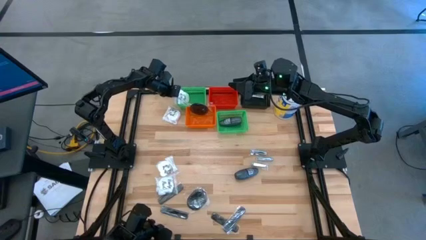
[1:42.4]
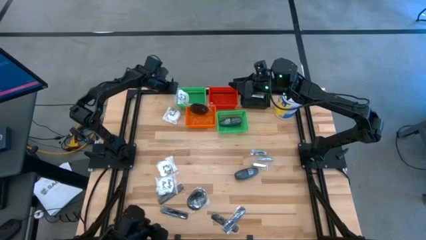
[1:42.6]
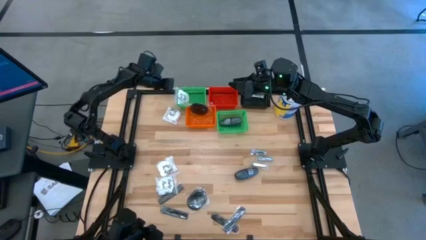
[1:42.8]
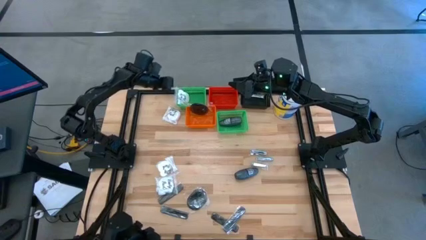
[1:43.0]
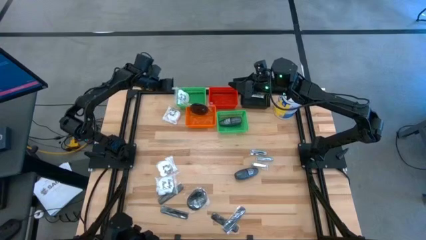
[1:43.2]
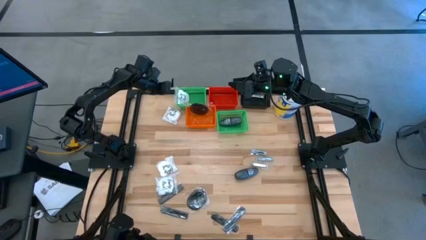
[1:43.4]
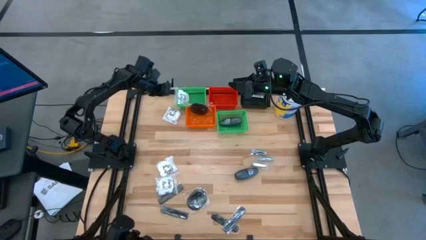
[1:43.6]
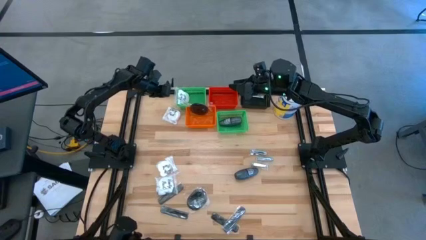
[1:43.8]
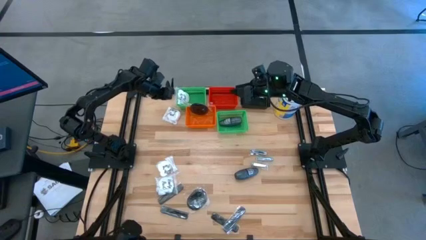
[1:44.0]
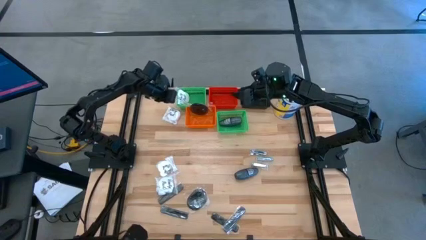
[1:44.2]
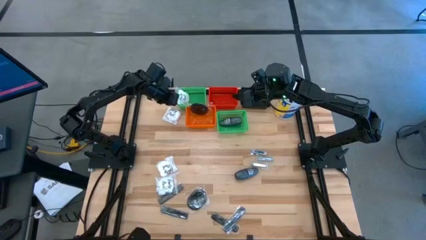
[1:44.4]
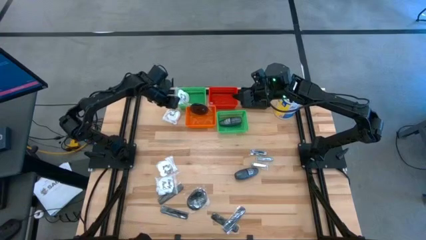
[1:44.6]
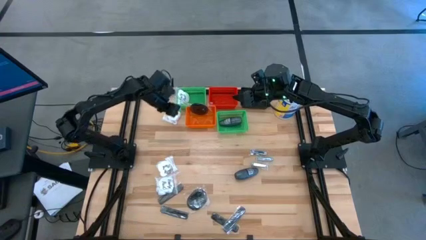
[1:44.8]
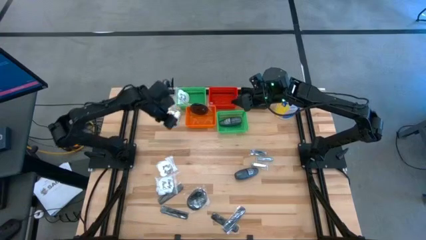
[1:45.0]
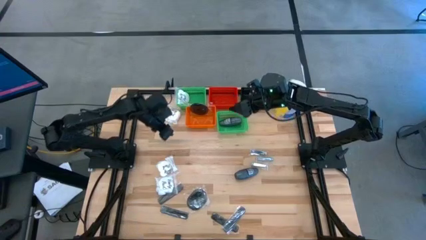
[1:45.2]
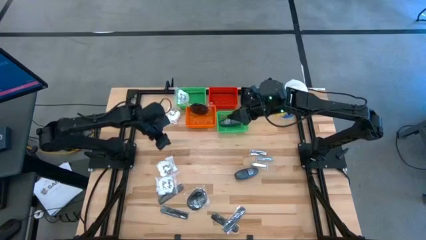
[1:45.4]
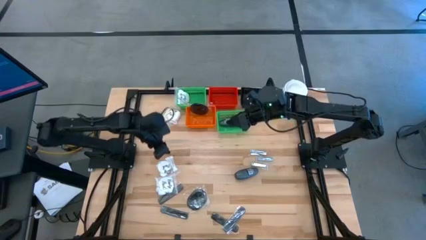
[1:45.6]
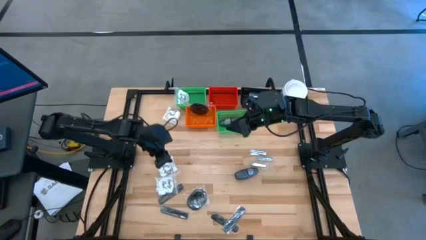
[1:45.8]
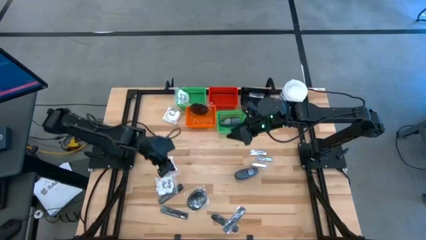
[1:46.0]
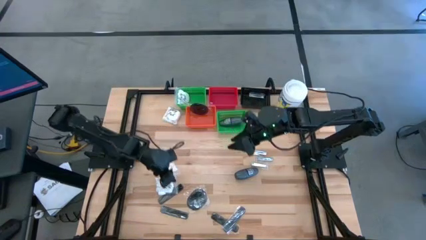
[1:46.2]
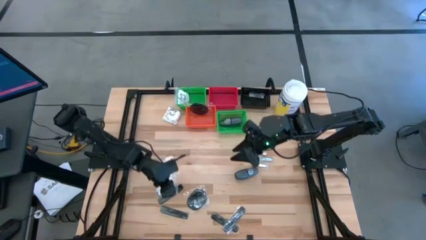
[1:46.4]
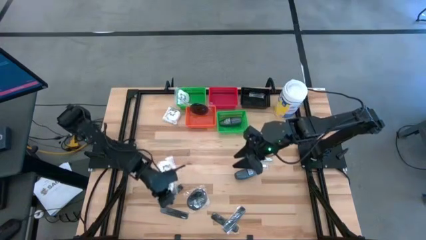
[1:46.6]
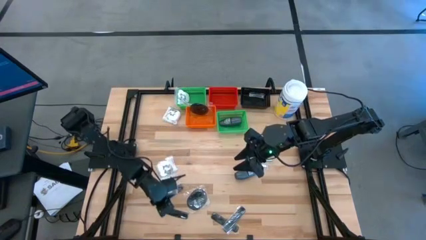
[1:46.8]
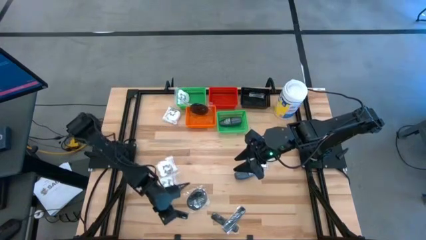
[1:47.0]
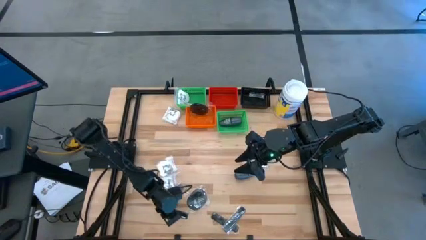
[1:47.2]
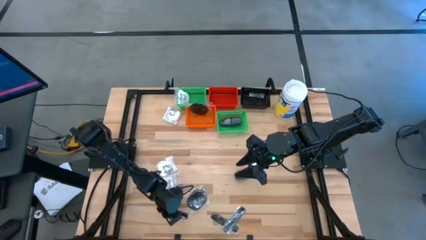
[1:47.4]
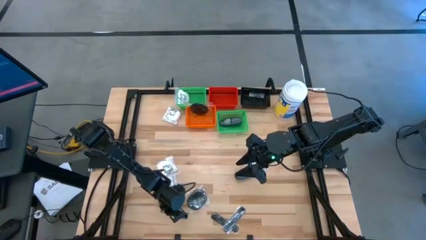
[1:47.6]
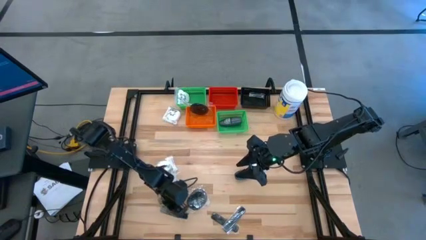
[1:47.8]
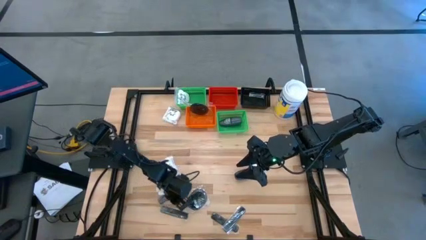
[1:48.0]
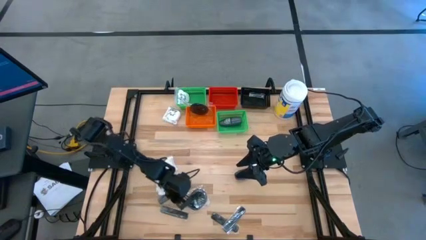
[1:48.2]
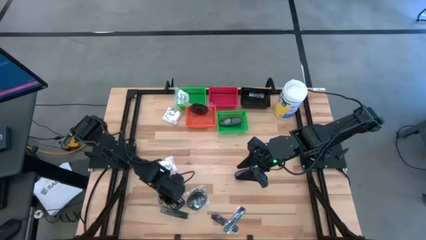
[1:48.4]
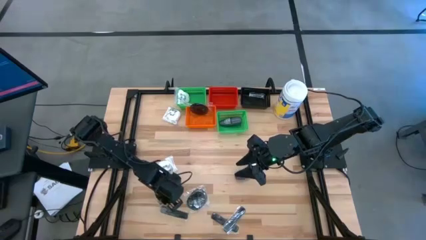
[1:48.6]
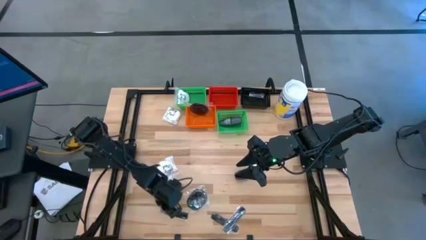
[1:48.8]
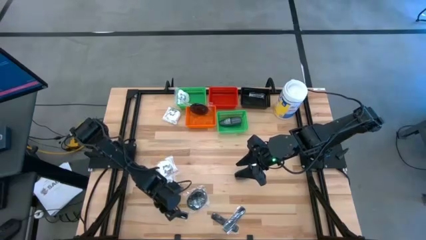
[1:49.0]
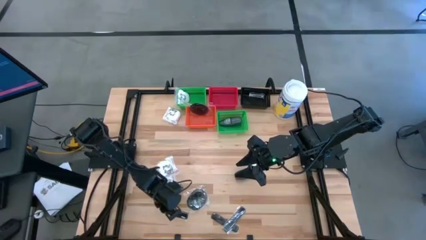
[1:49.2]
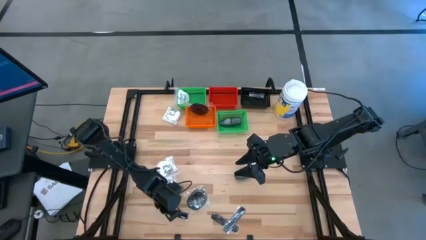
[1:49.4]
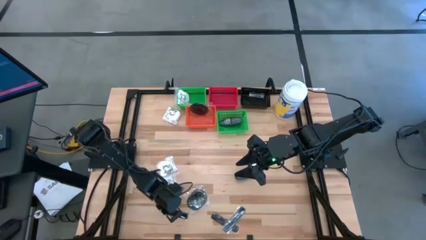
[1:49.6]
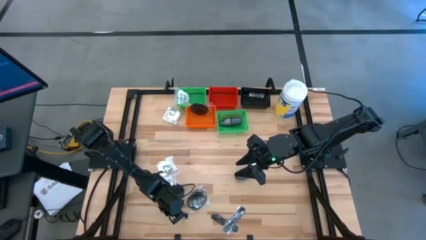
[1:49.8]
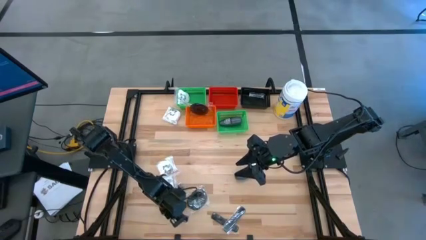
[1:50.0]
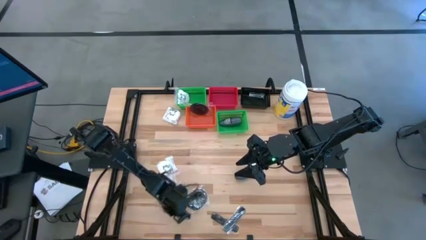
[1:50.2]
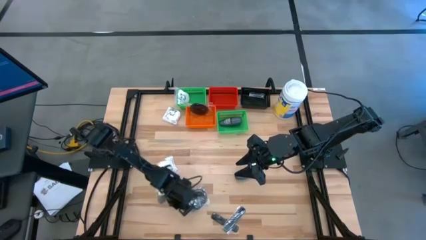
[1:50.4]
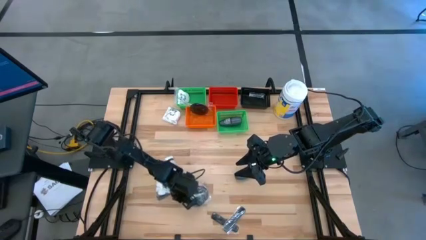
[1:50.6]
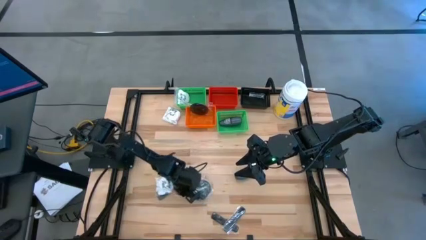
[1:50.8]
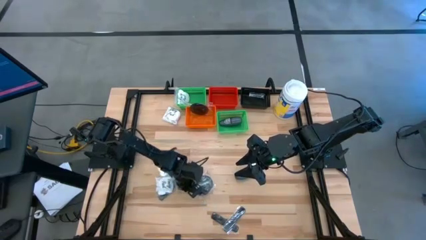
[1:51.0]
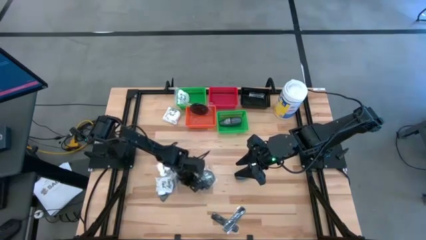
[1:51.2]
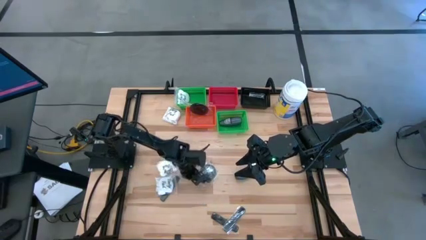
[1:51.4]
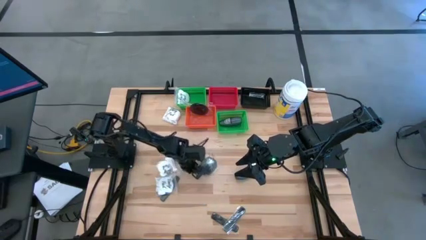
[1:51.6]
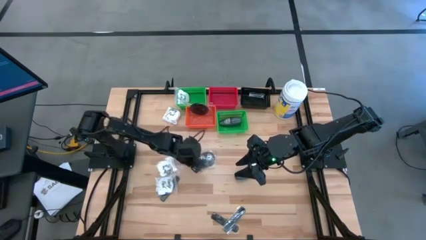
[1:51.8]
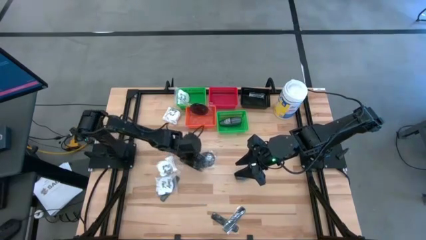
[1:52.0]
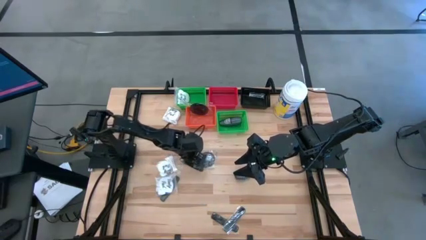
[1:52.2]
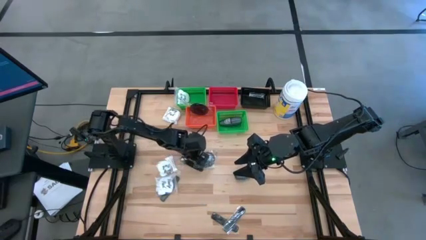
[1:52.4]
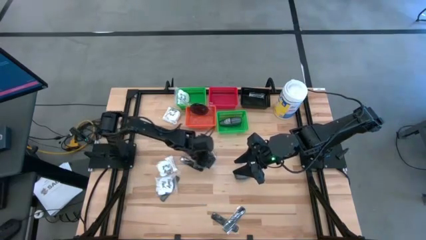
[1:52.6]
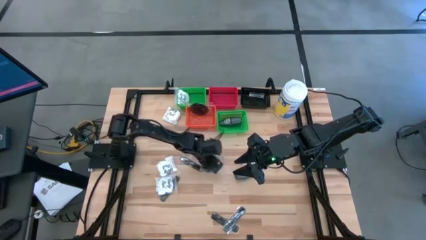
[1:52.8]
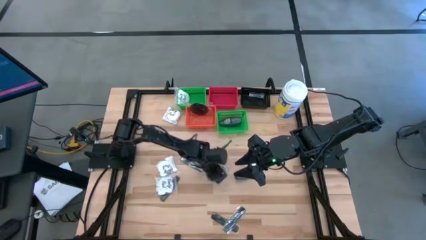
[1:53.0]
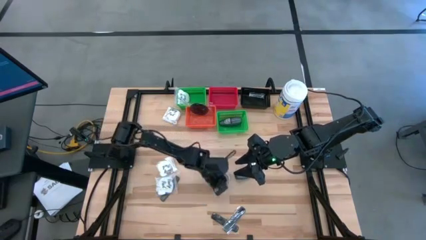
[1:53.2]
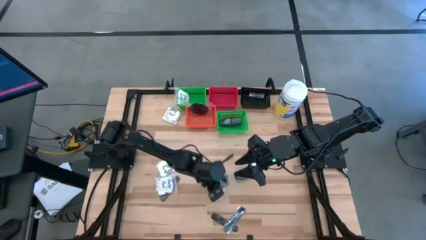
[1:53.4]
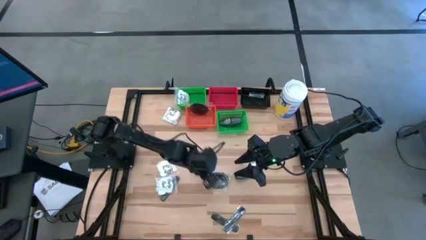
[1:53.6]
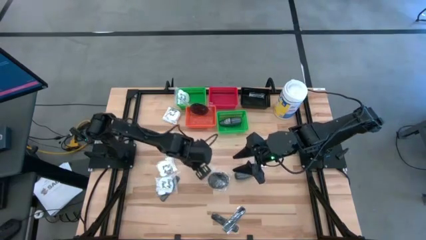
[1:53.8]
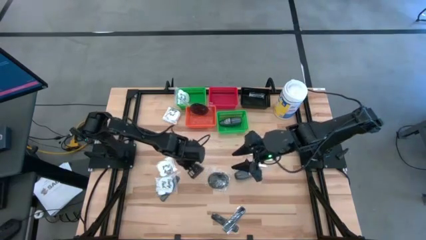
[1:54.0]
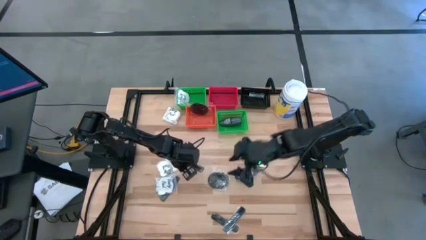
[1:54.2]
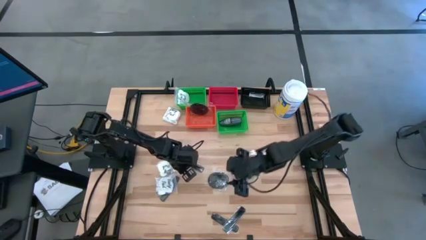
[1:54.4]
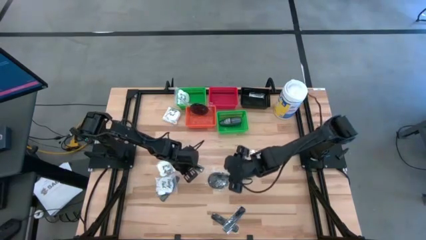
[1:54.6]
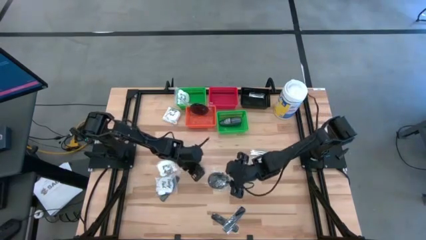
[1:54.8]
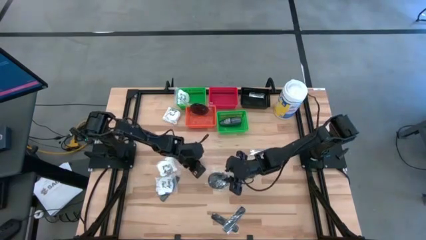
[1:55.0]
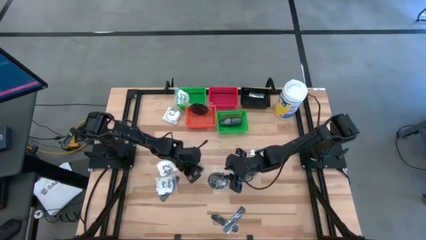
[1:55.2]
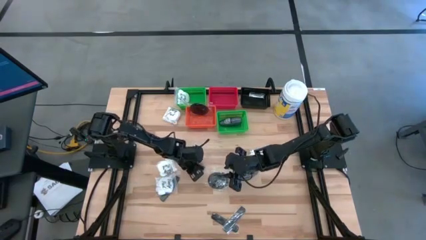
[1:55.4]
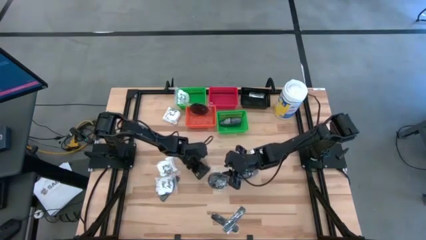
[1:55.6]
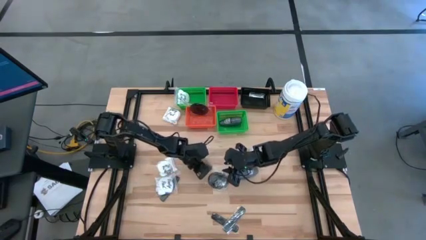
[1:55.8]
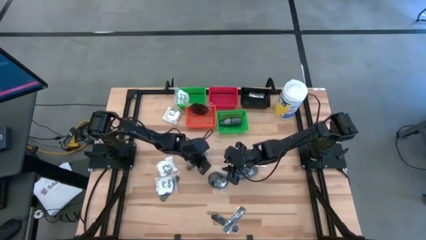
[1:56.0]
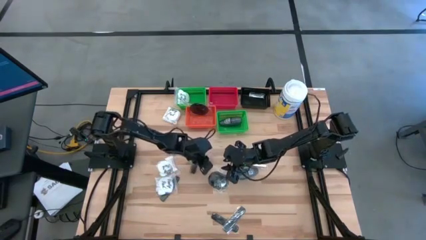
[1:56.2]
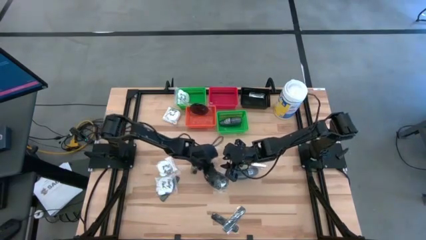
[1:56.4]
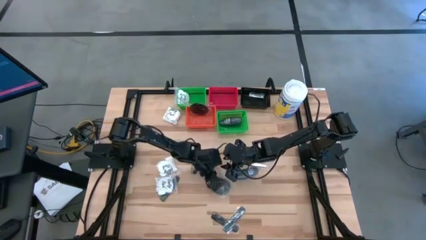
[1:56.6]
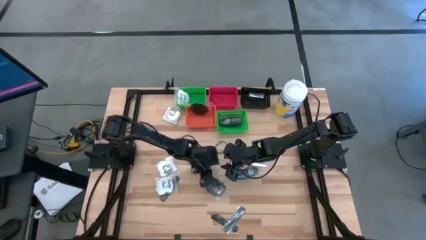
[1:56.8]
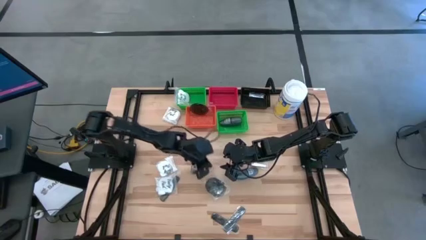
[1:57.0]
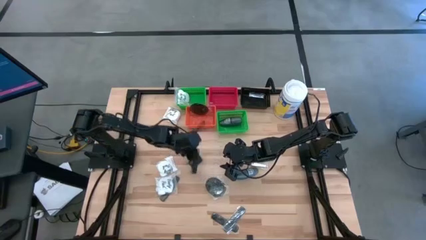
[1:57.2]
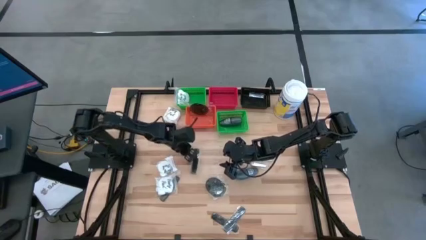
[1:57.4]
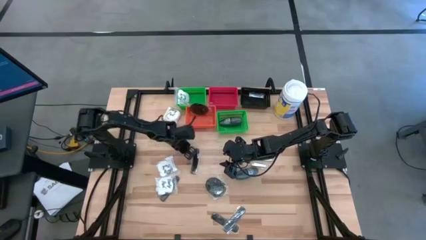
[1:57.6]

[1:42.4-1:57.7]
Task: Pick & Place Travel size toiletries
Put the black comb into the red bin

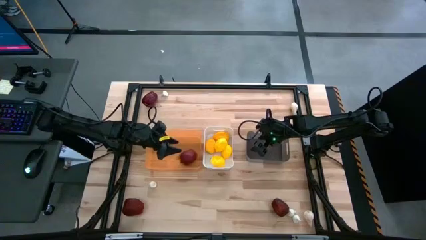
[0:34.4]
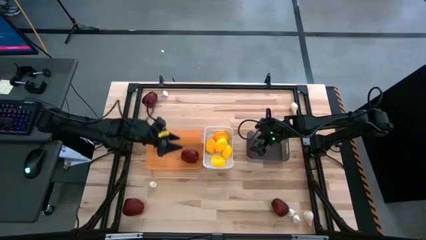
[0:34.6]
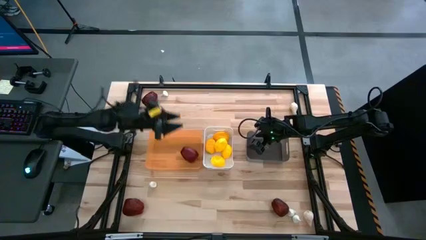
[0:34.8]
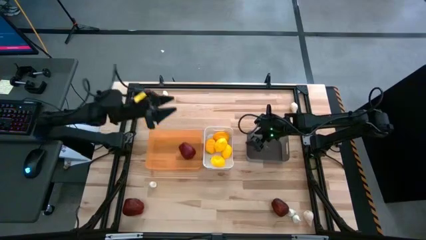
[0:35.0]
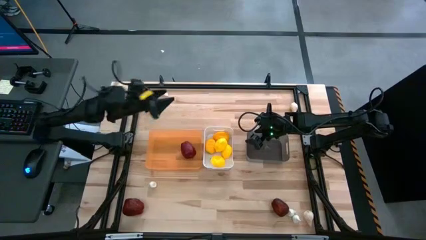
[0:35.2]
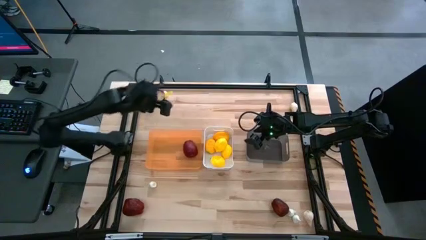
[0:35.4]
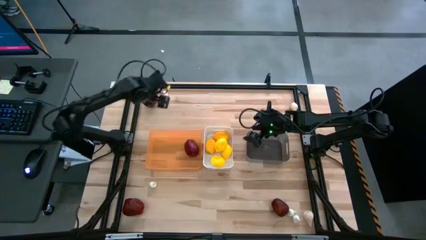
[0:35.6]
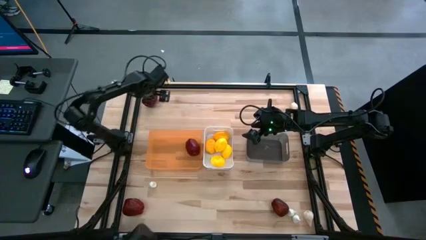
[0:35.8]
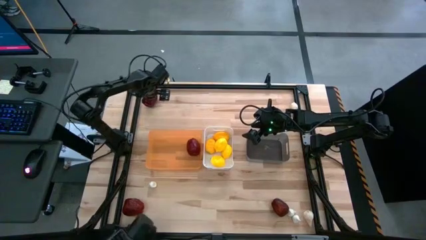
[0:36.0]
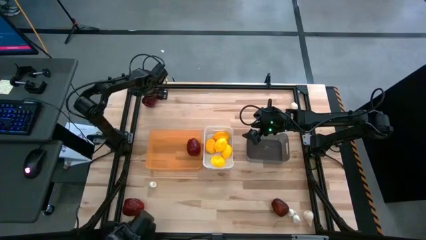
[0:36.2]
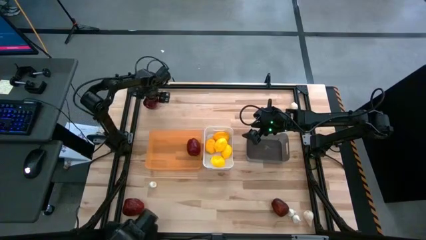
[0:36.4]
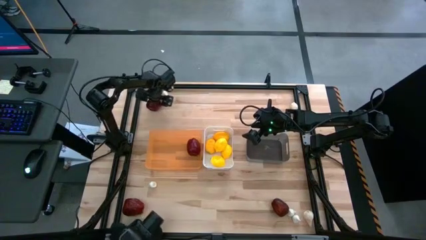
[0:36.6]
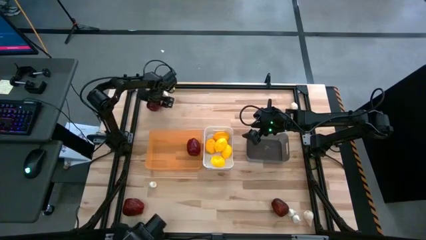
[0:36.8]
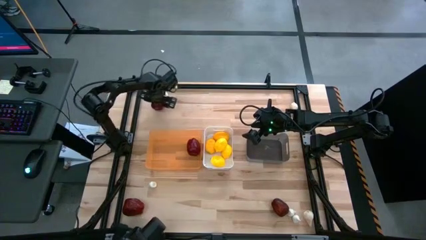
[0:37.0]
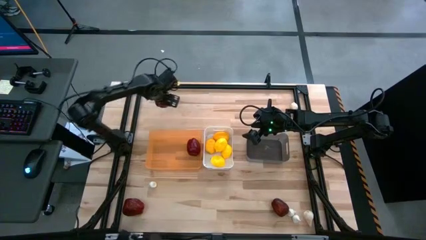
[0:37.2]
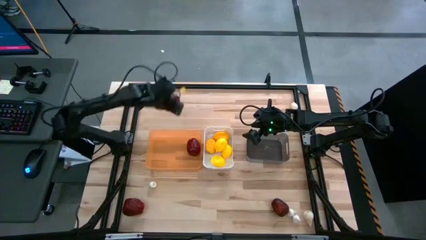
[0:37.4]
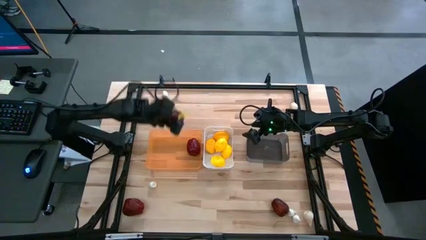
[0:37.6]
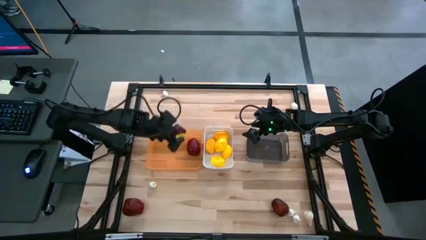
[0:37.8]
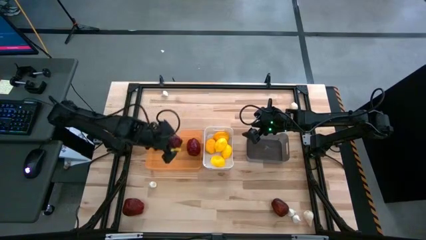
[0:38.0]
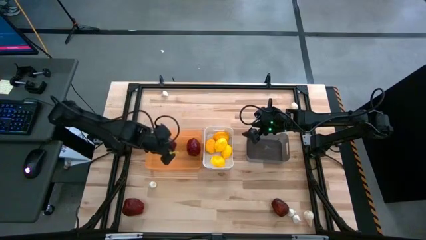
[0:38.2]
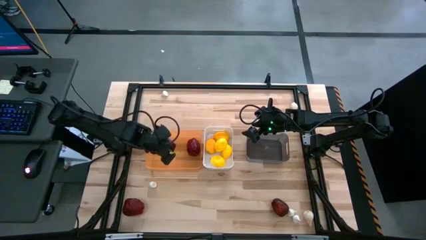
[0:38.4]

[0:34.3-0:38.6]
Task: Sort produce into baskets
Put the red apple into the orange bin
